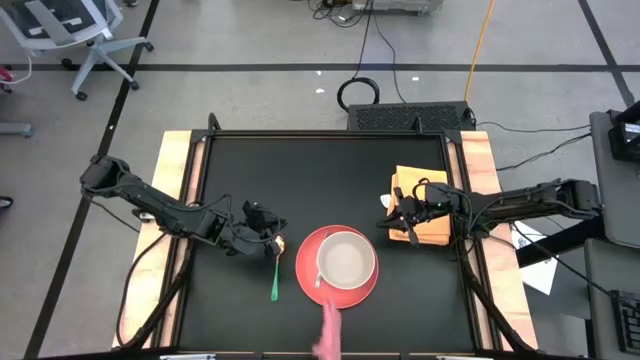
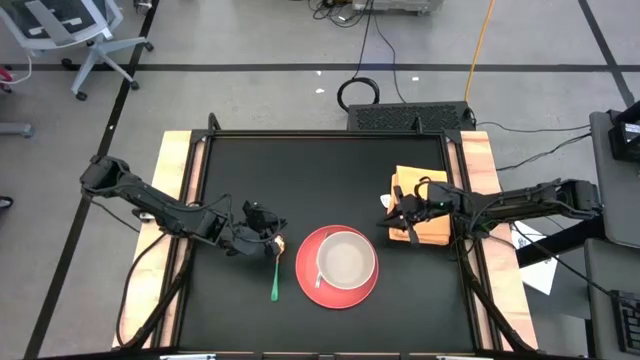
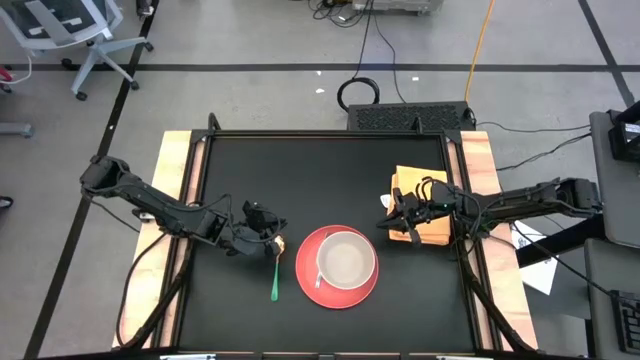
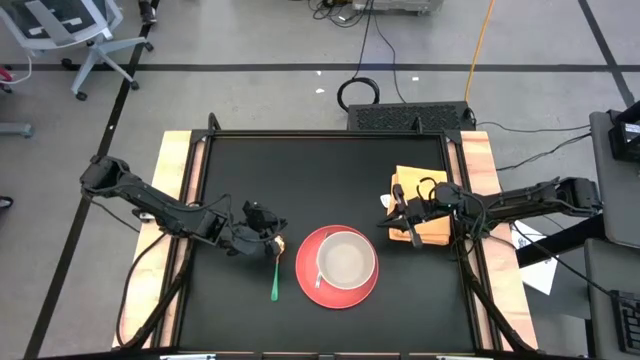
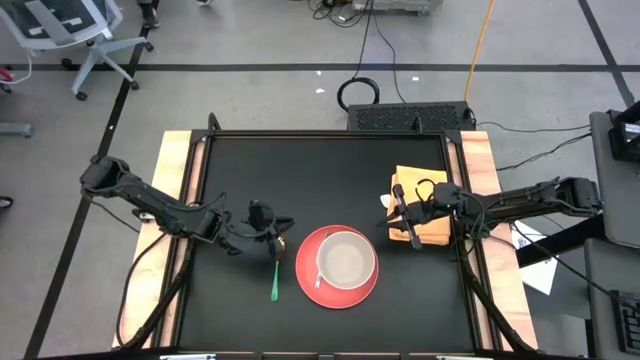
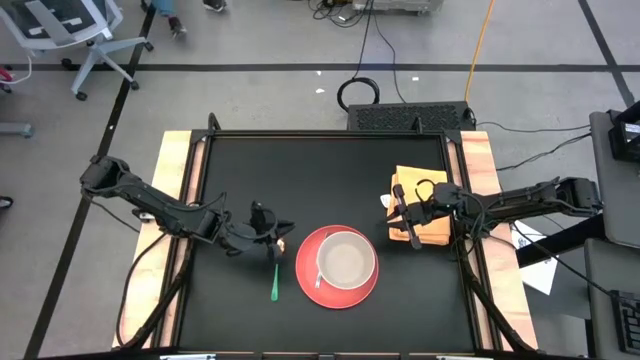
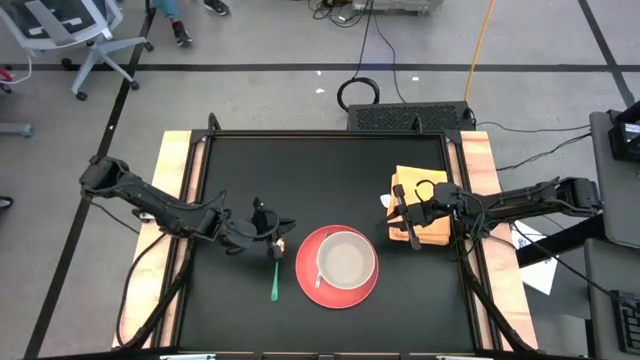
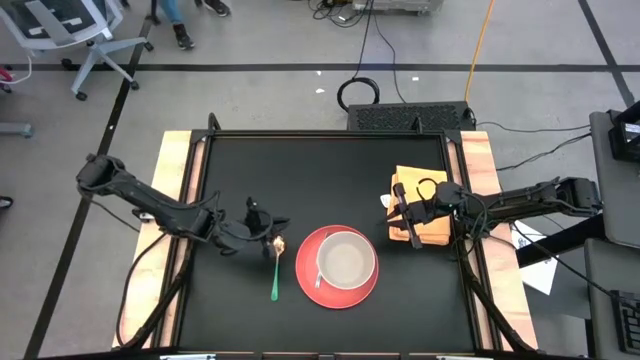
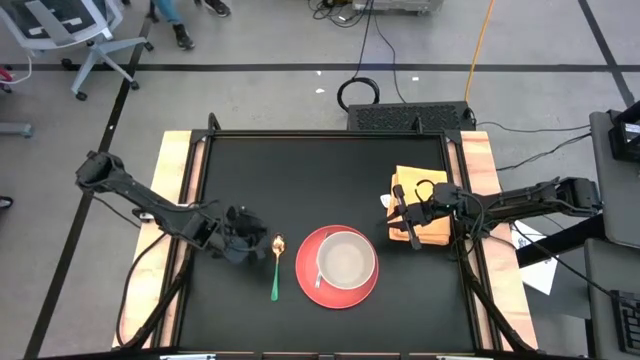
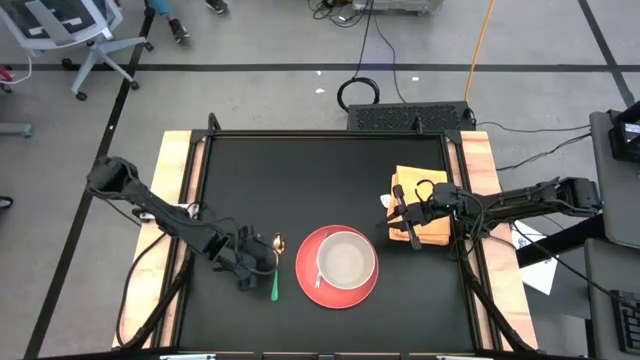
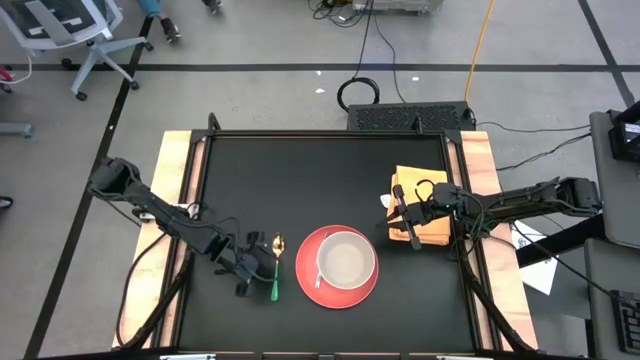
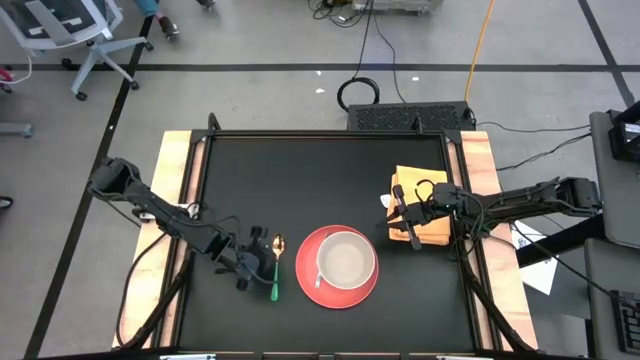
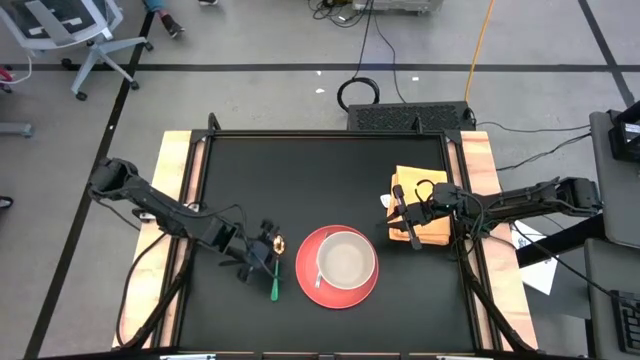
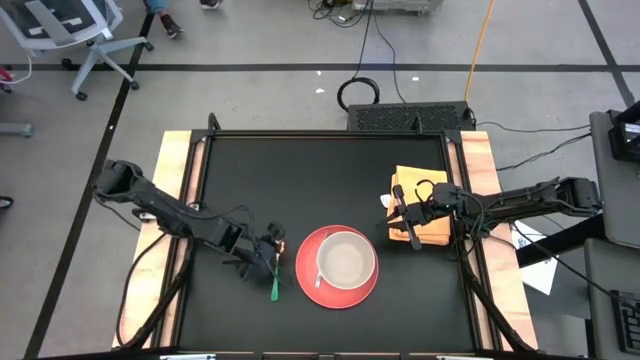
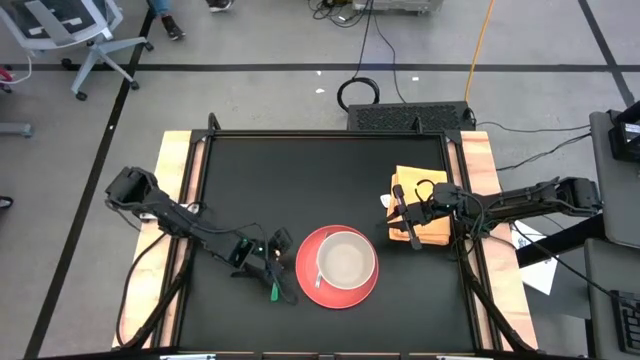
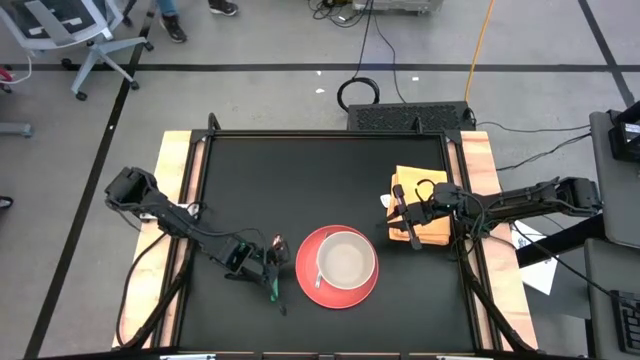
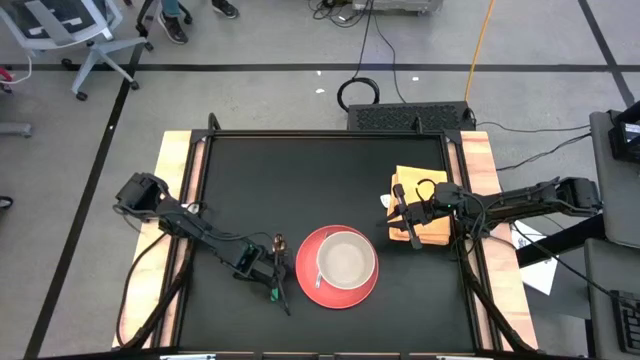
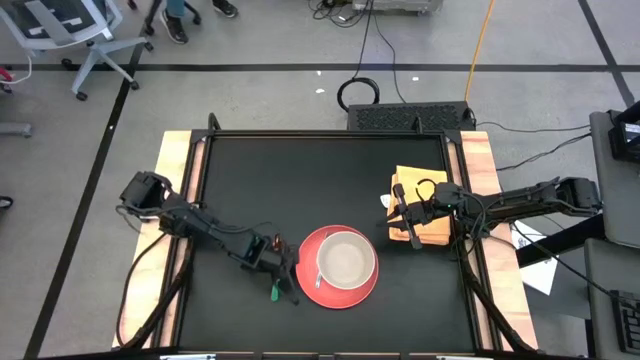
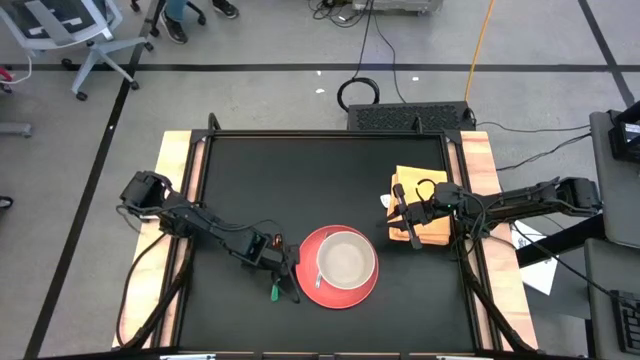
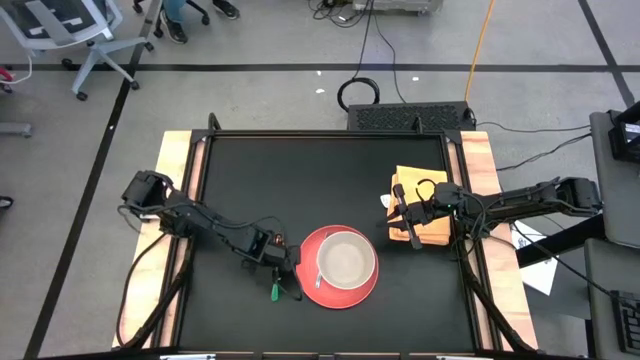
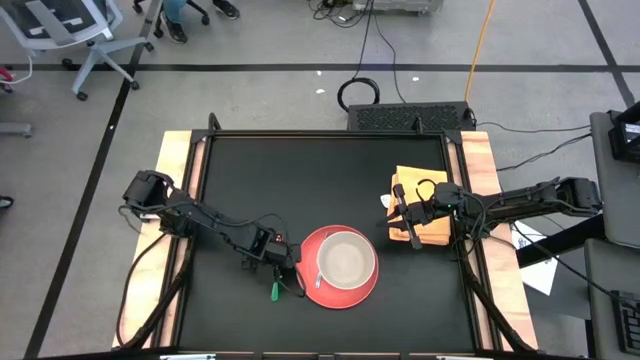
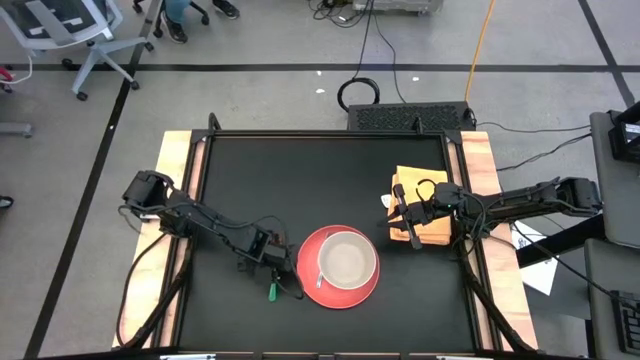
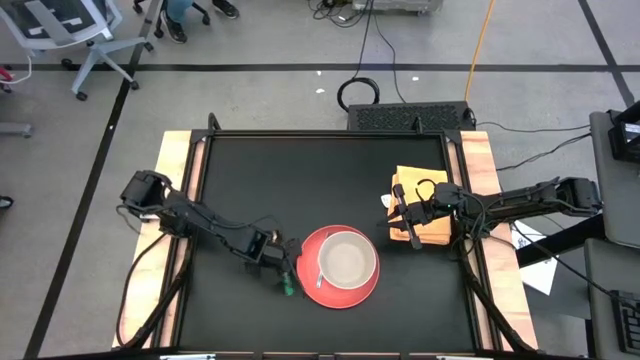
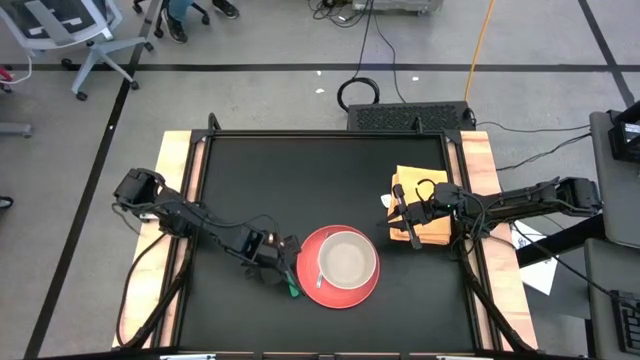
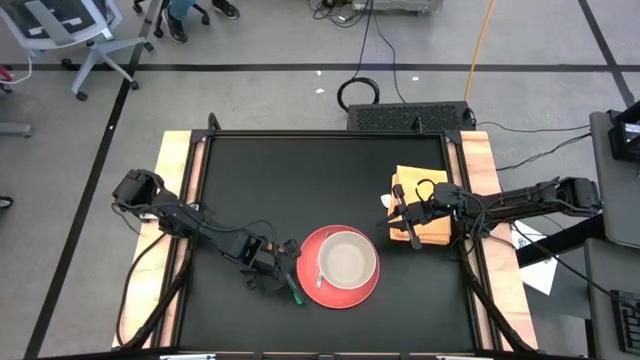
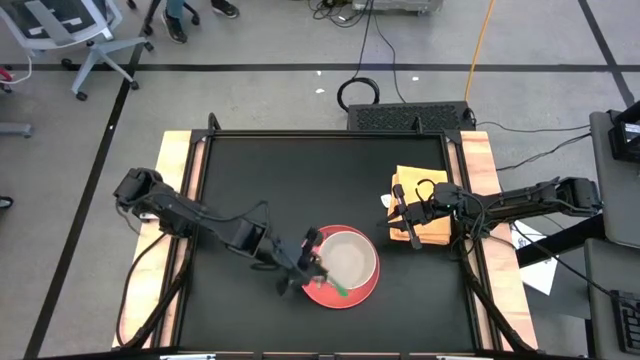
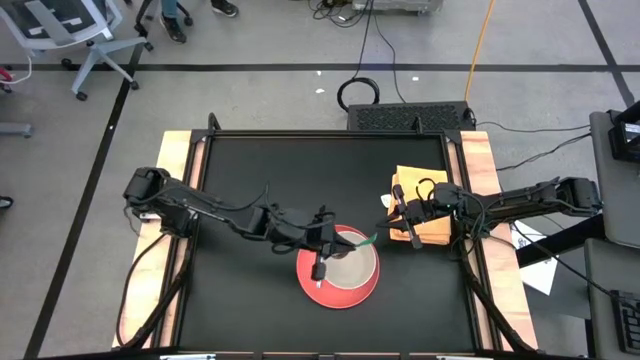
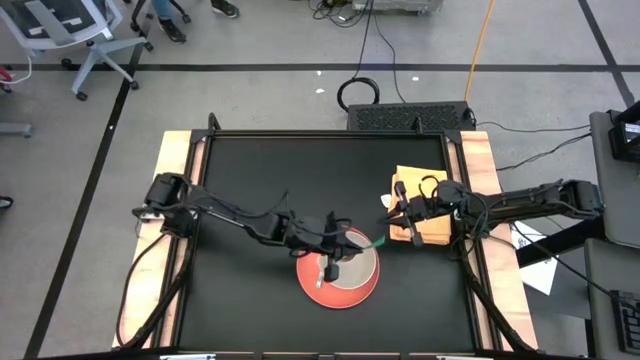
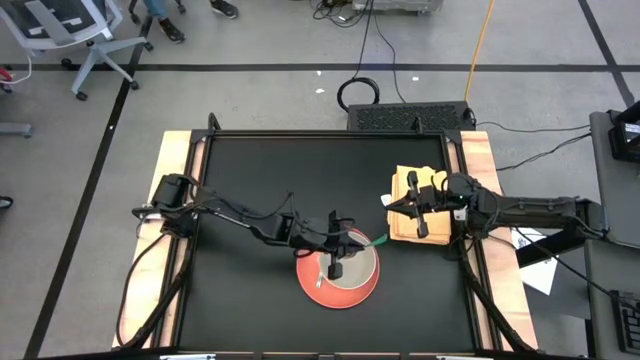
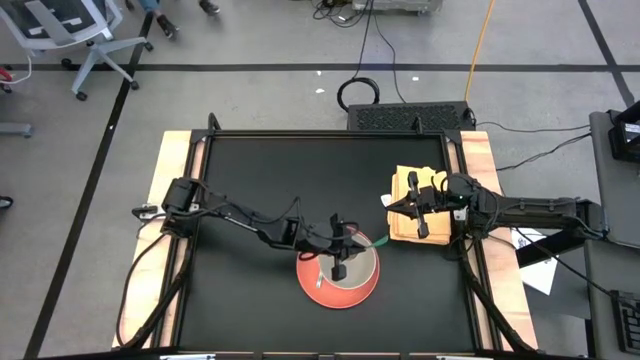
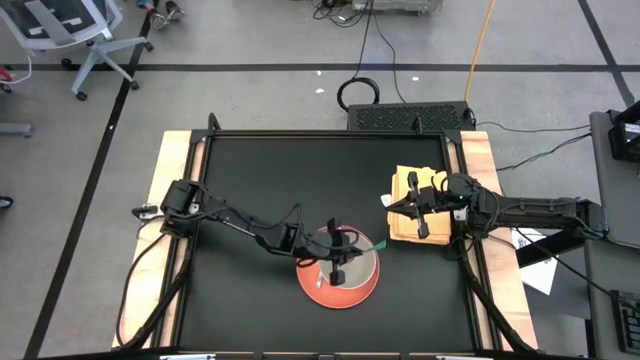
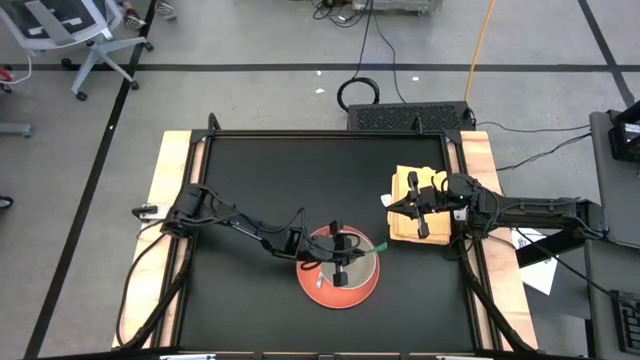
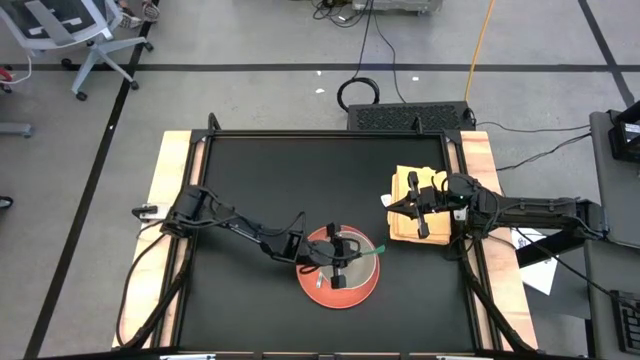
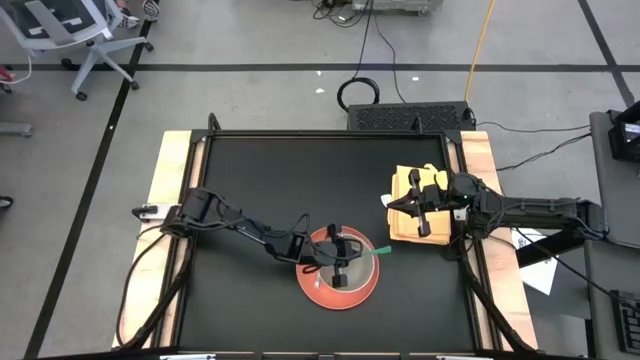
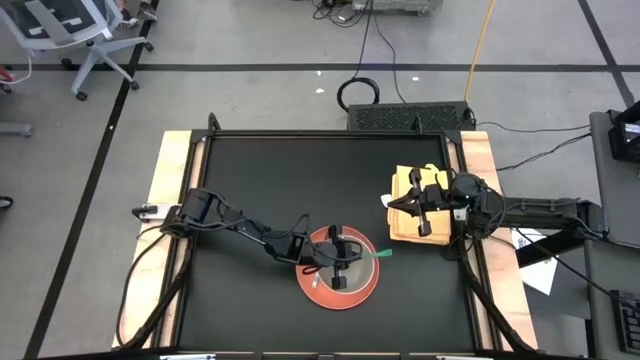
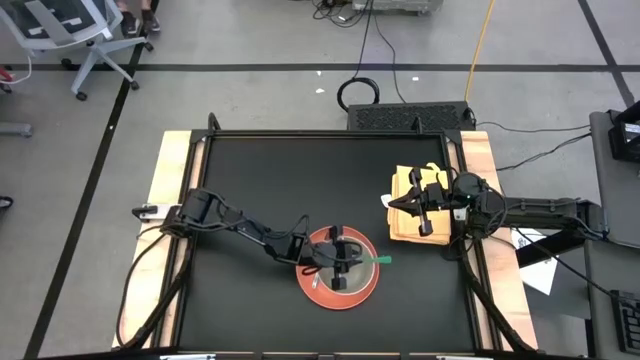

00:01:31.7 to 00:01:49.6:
Task: Set table place
Put the green spoon into the white bowl

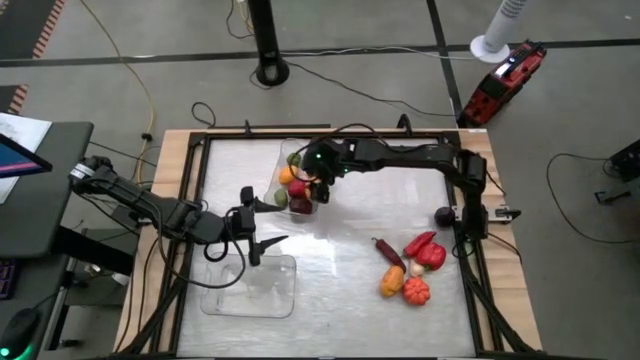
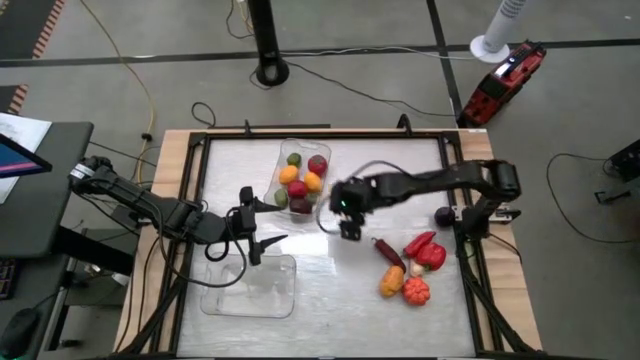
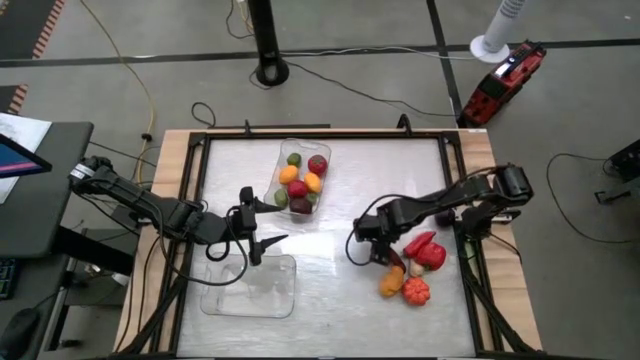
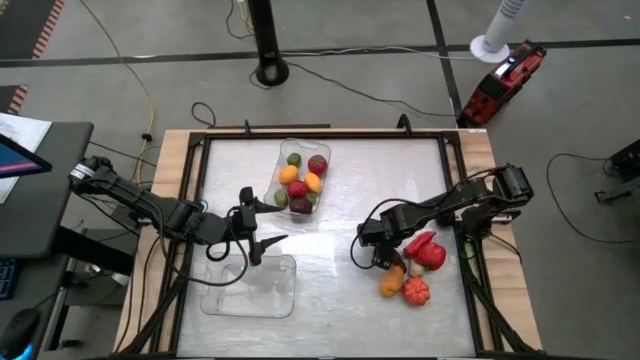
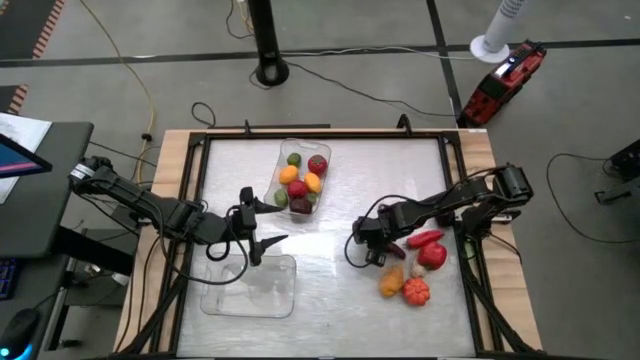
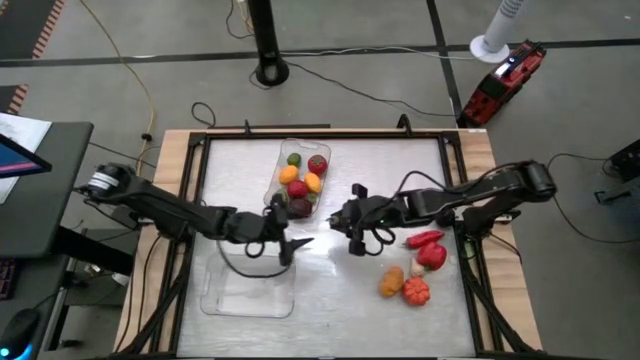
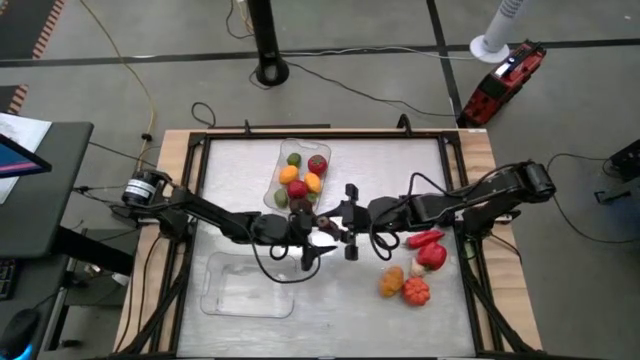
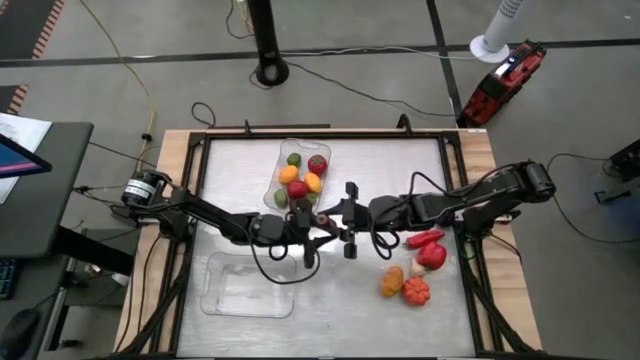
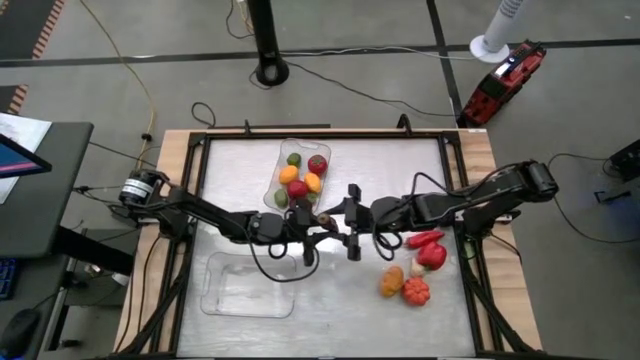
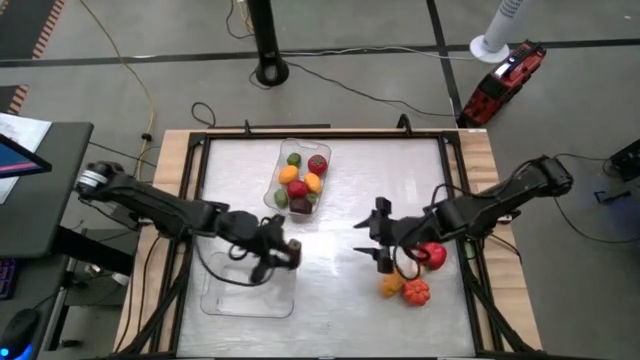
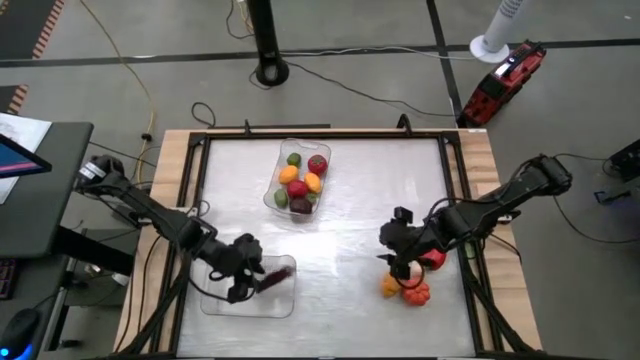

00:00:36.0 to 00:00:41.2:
Task: Sort produce into baskets
Put the left chili pepper into the bottom transparent bin
